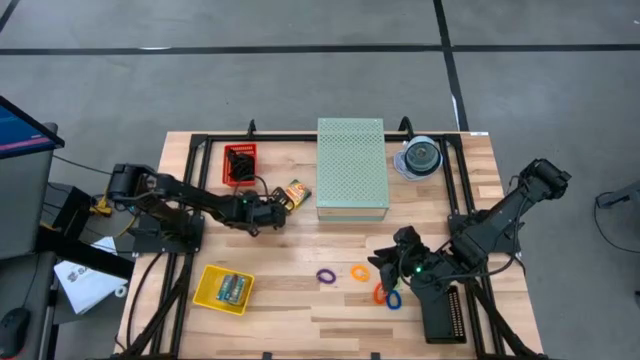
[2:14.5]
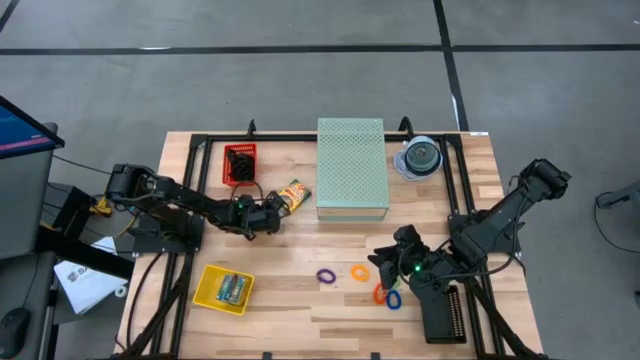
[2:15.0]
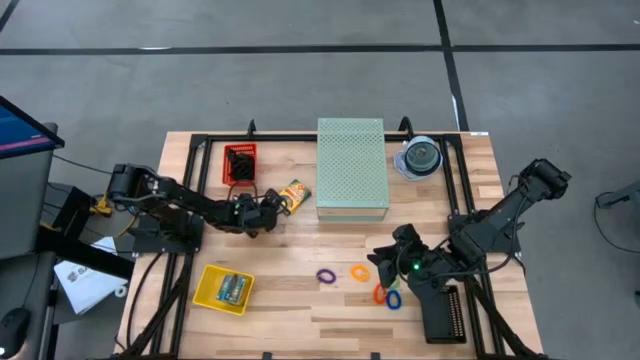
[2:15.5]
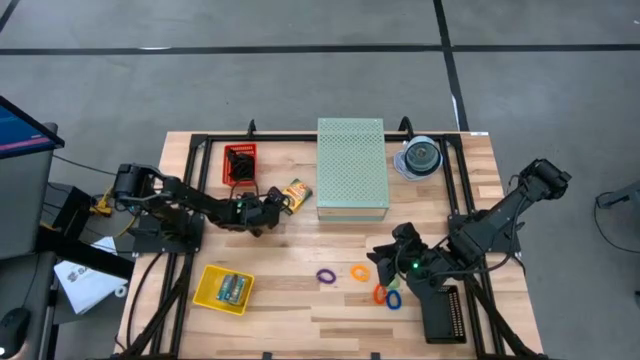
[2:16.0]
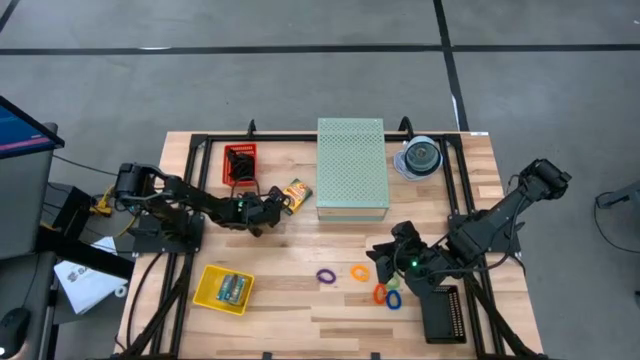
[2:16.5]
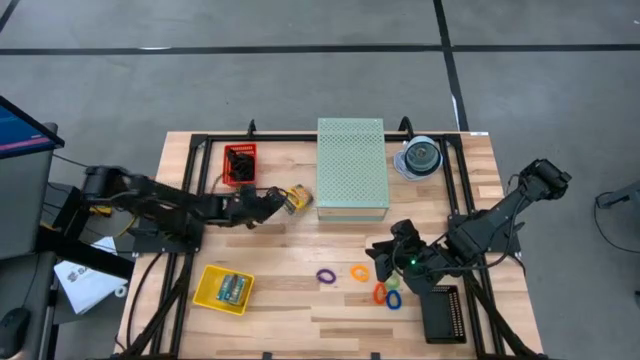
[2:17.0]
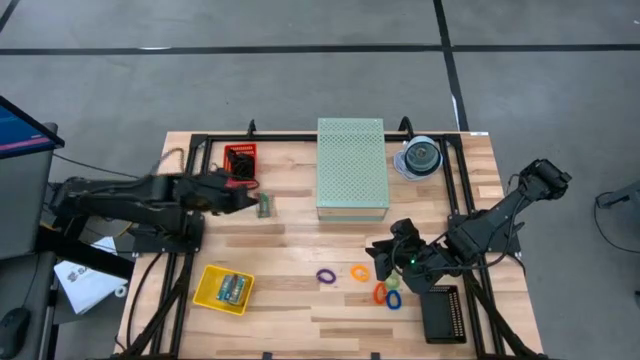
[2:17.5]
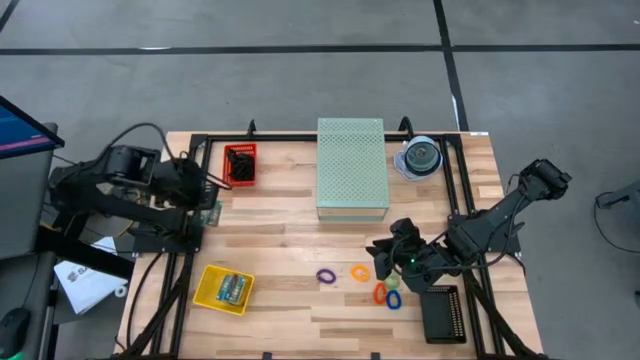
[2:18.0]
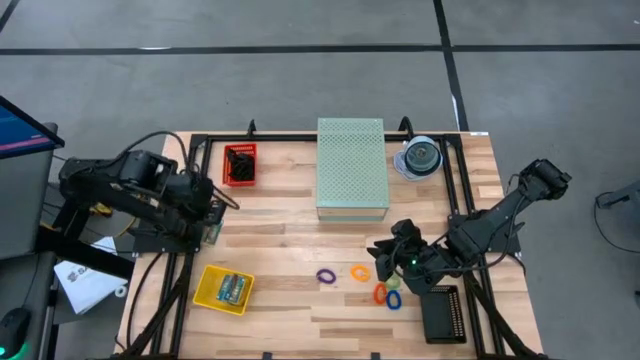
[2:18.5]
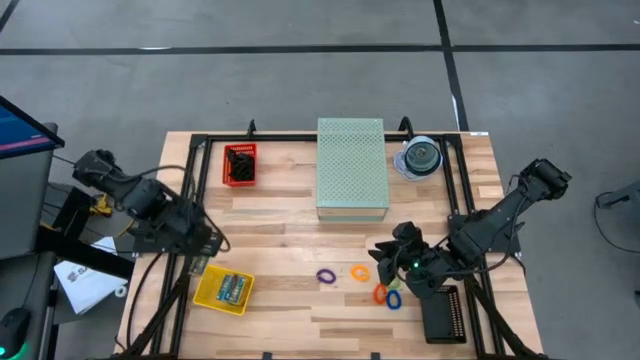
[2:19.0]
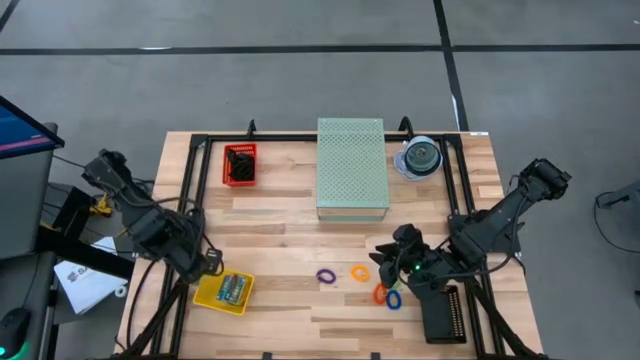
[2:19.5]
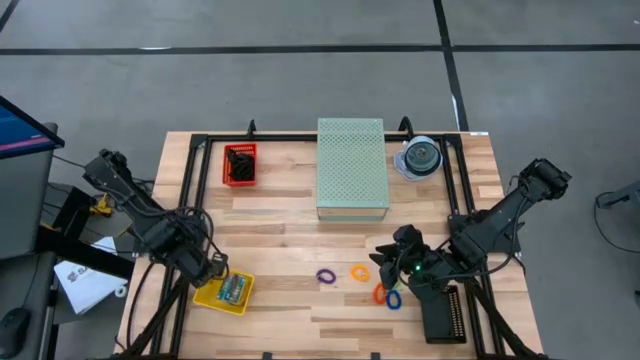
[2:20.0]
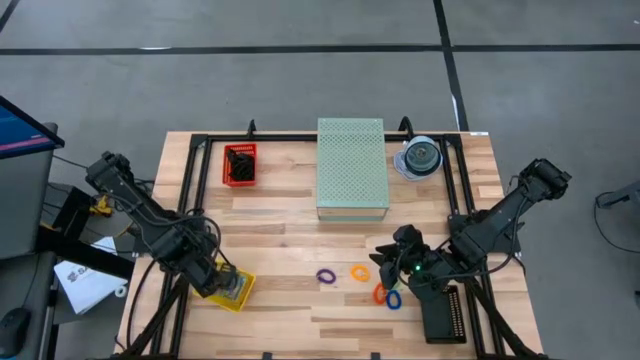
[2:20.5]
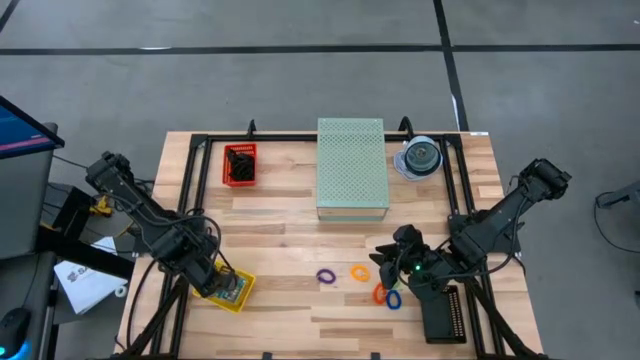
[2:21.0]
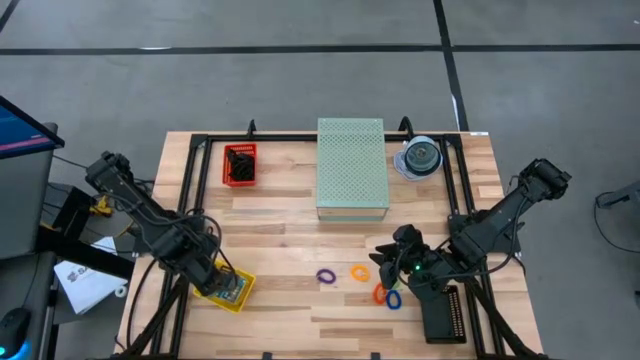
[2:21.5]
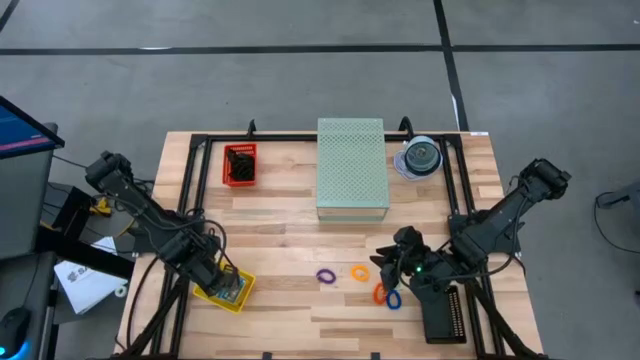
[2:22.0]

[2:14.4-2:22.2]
Task: Pick & Place Office Desk Supplies
Put the crayon box into the yellow bin

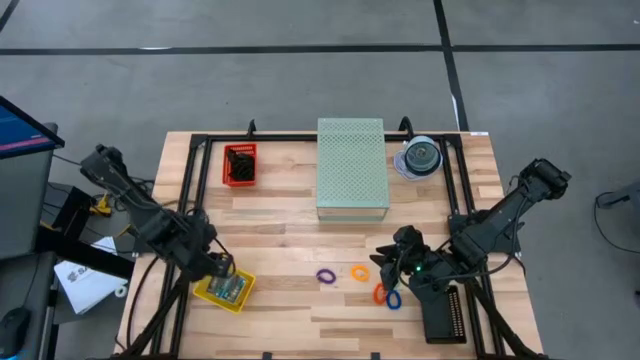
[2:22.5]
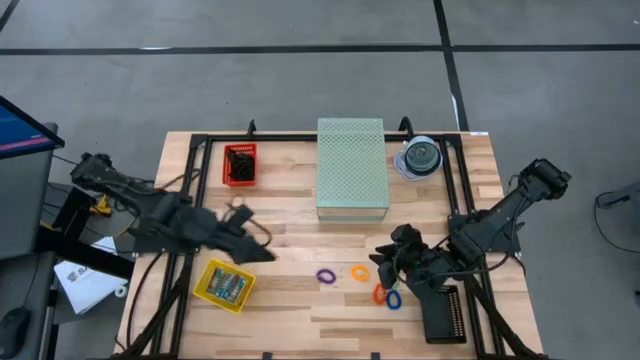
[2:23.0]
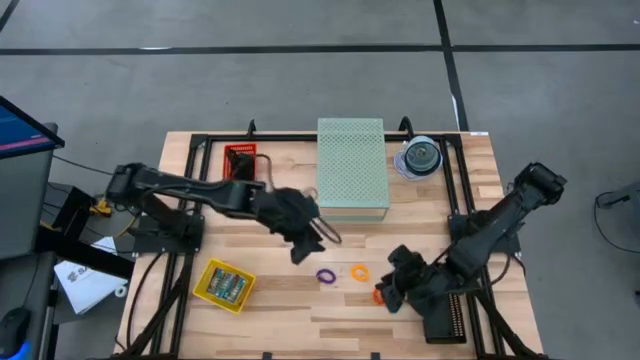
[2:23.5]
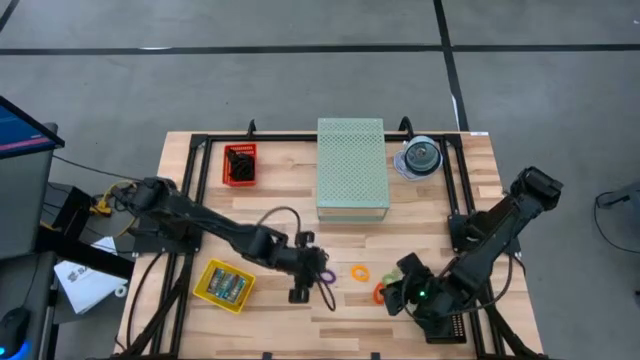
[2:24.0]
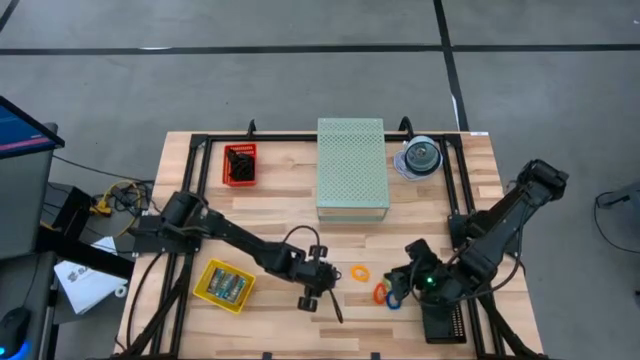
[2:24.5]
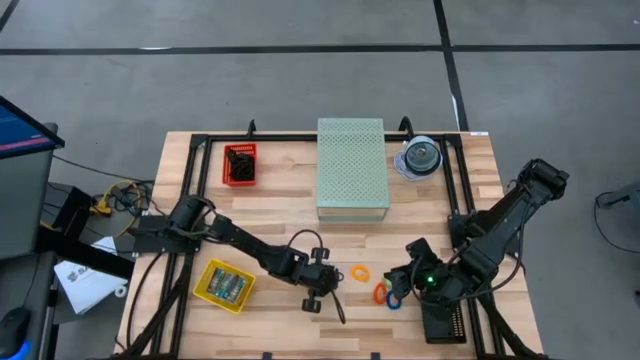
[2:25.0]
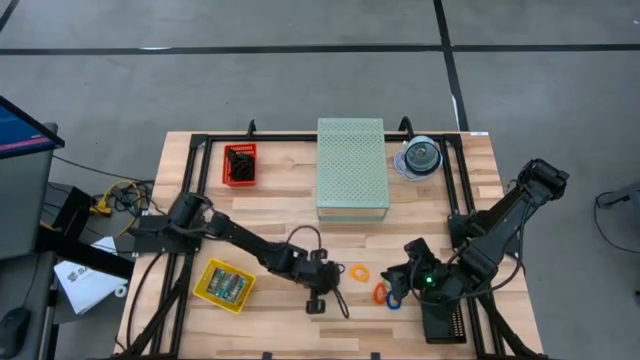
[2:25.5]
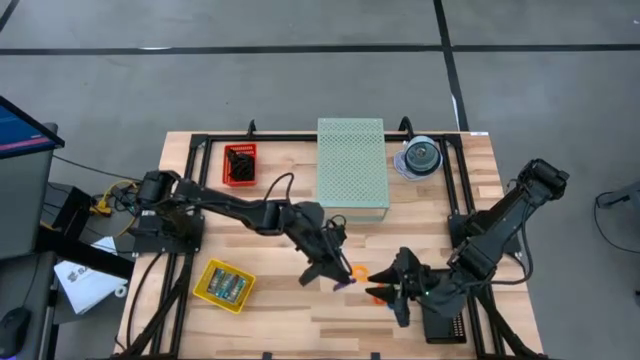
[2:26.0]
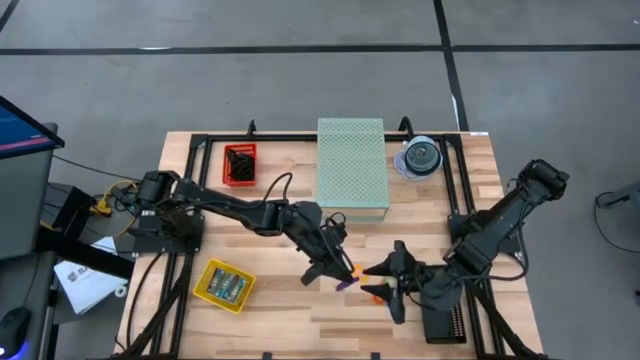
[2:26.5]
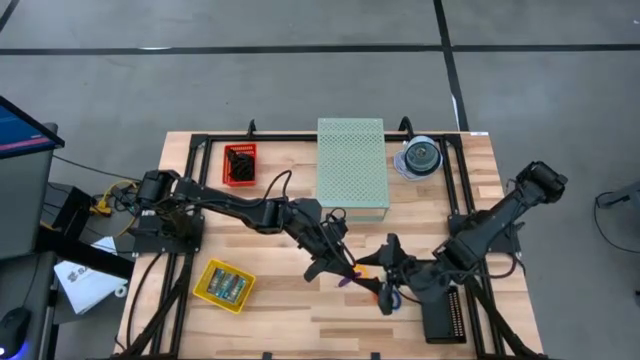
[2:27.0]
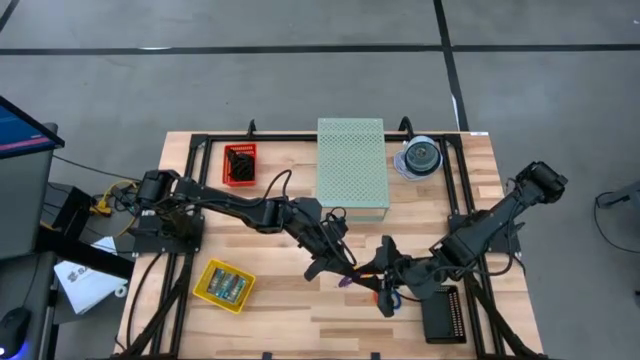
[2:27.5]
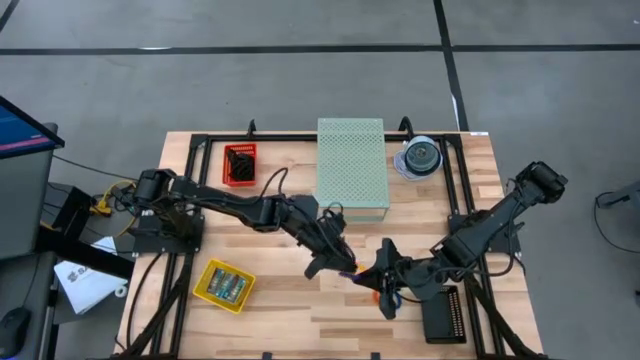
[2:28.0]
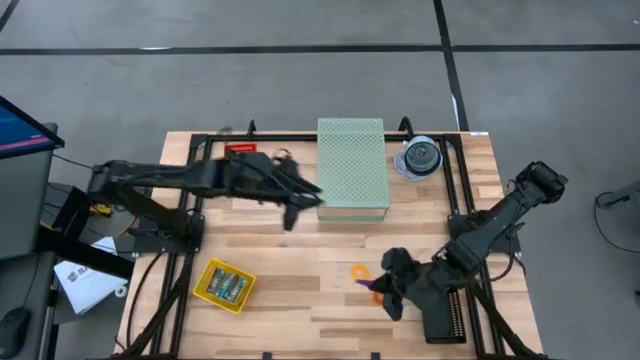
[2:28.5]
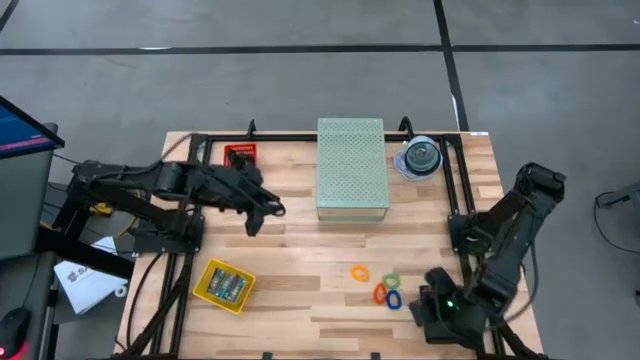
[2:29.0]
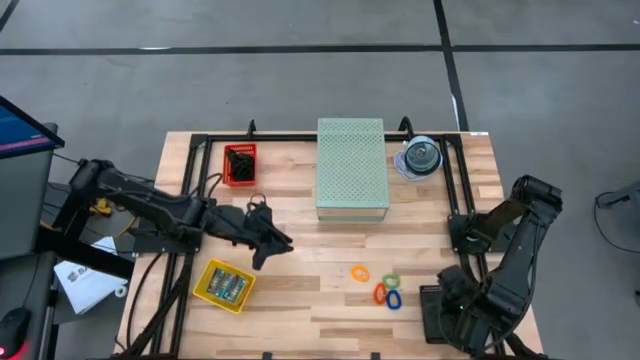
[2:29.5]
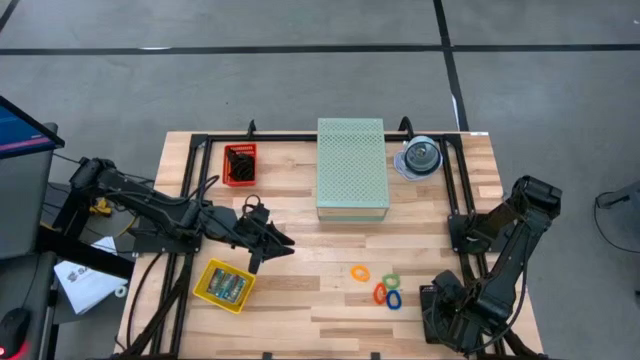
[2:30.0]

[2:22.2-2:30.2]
Put the violet spring keychain band into the black bin

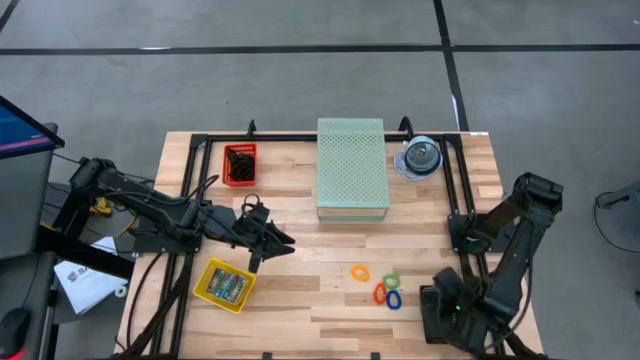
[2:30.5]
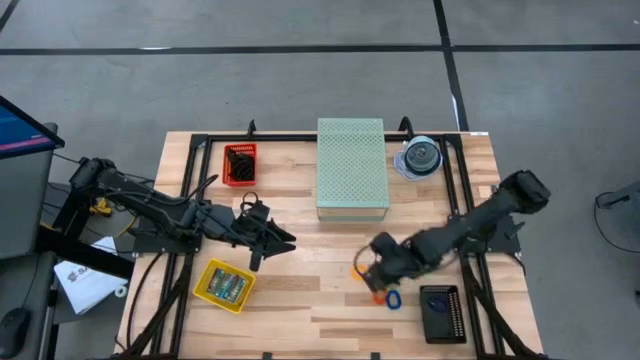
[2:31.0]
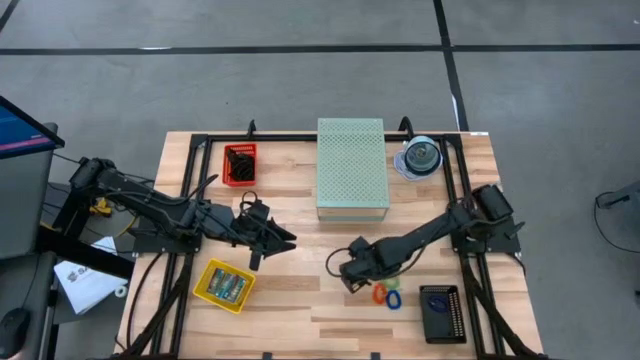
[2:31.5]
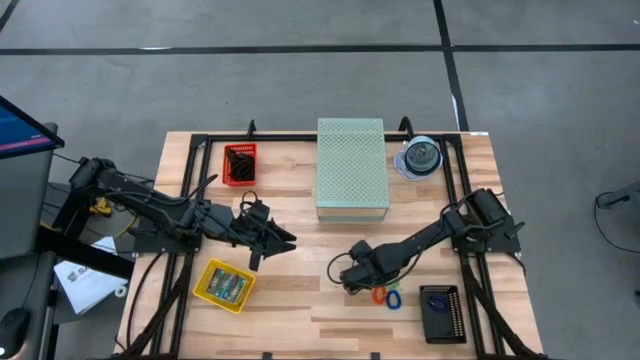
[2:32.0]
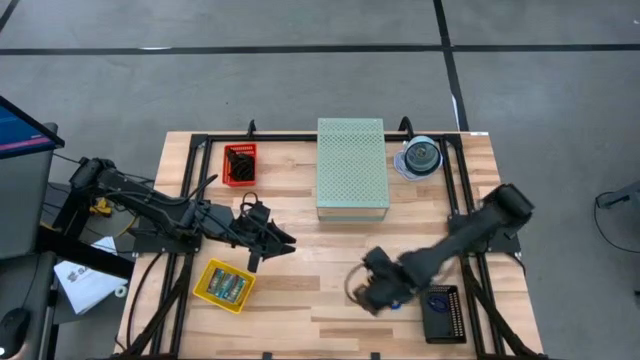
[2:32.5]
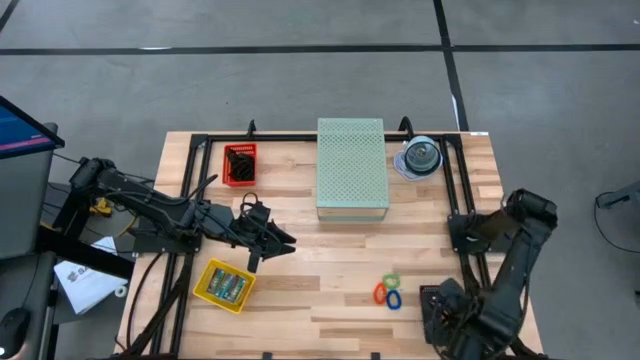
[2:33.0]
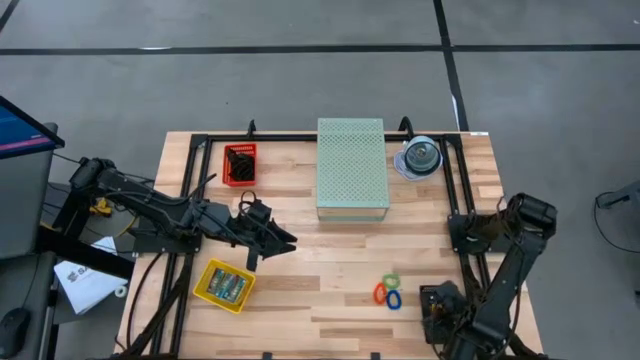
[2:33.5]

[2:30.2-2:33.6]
Put the yellow spring keychain band into the black bin

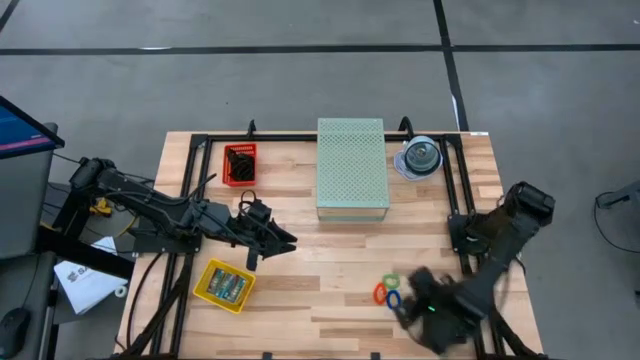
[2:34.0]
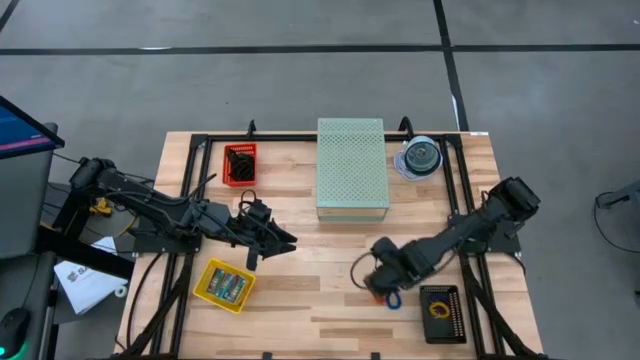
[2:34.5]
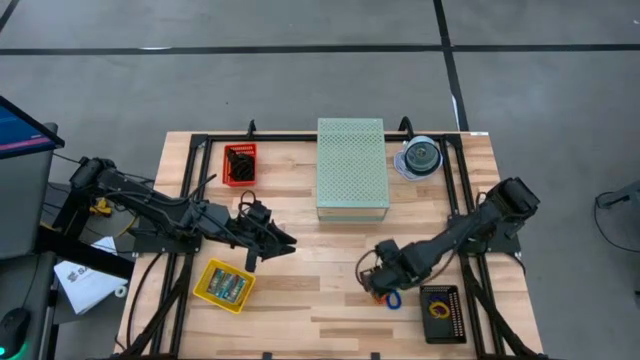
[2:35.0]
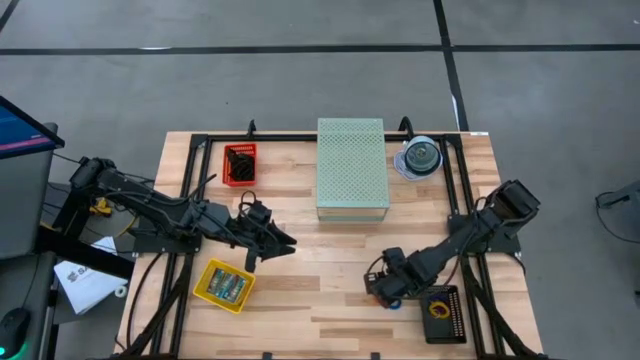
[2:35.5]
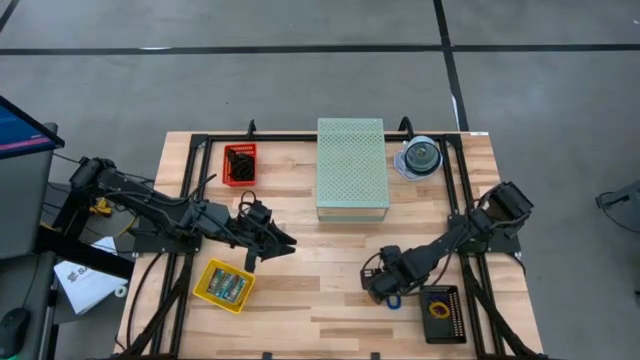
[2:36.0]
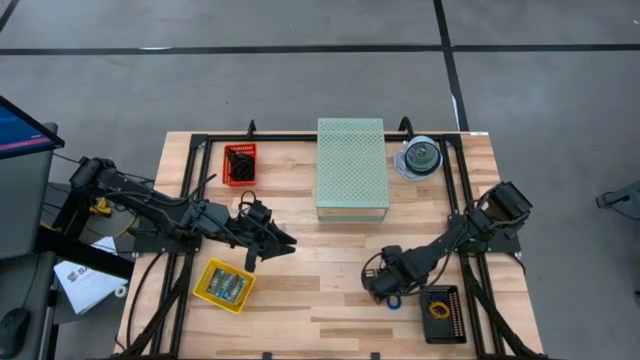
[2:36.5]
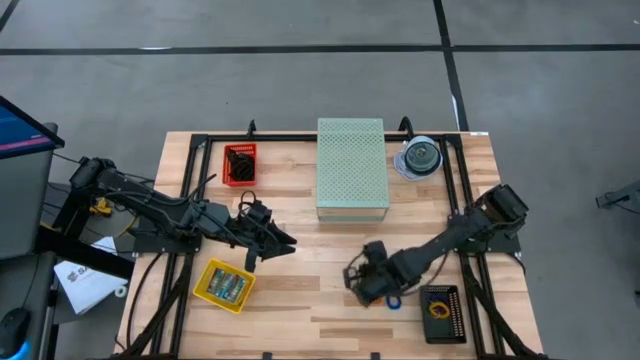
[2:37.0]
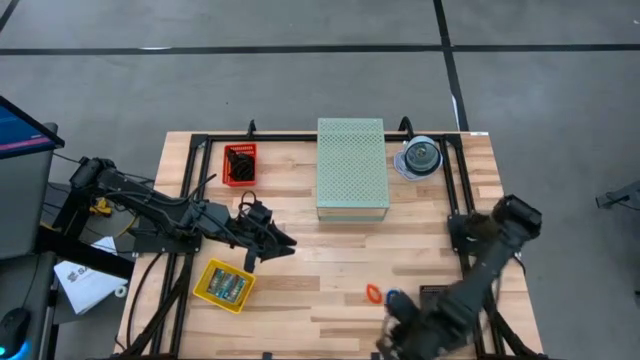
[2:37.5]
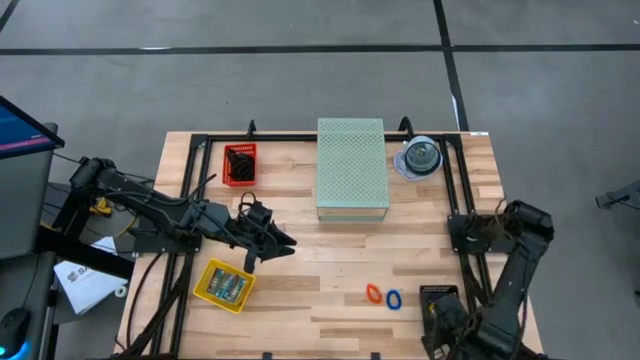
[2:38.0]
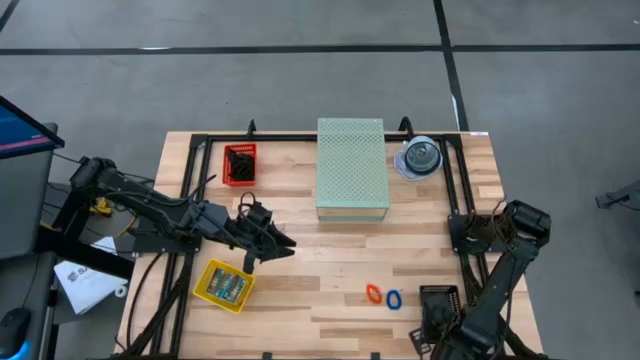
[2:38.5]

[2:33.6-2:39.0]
Put the green spring keychain band into the black bin
